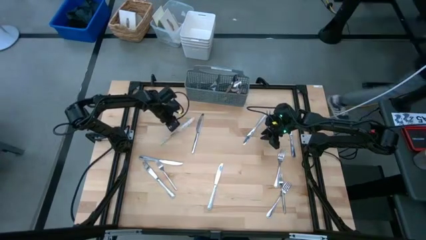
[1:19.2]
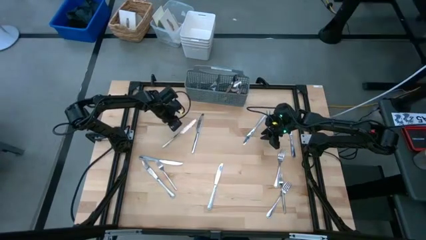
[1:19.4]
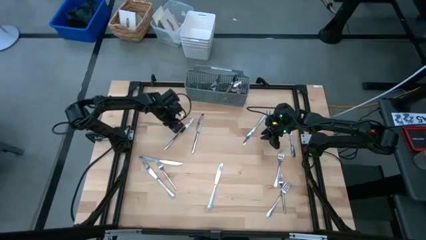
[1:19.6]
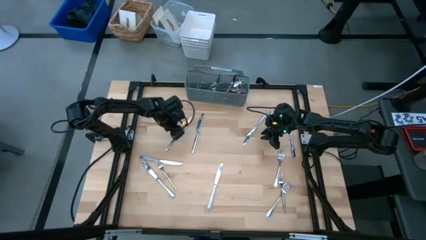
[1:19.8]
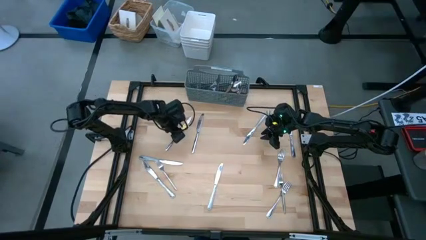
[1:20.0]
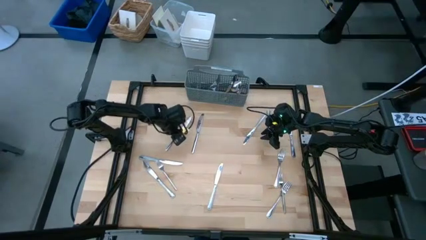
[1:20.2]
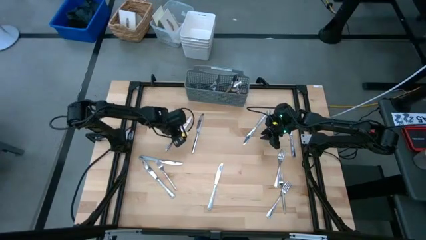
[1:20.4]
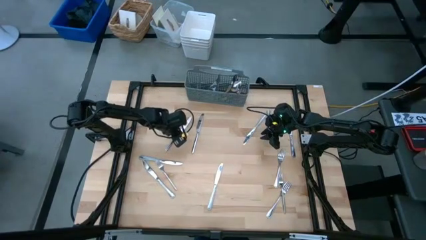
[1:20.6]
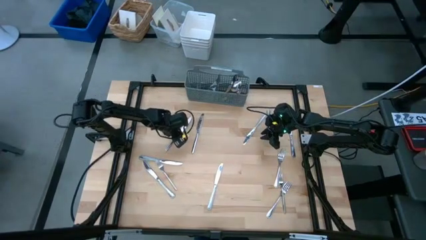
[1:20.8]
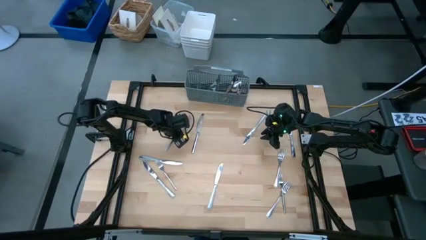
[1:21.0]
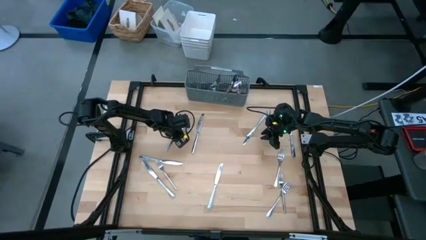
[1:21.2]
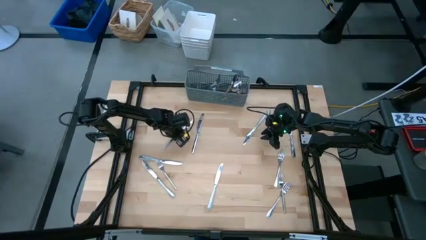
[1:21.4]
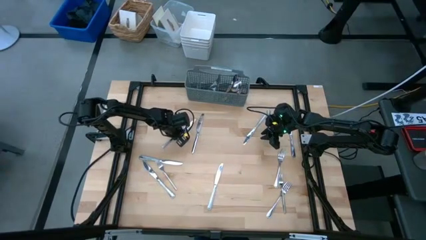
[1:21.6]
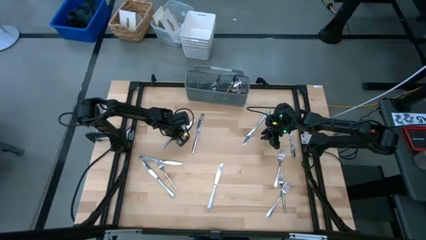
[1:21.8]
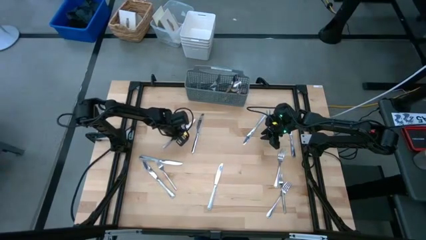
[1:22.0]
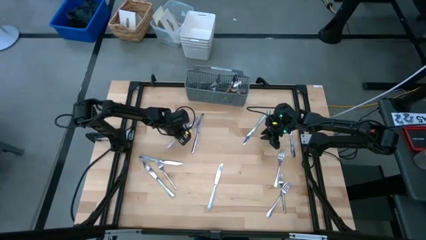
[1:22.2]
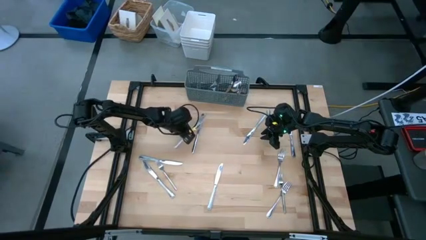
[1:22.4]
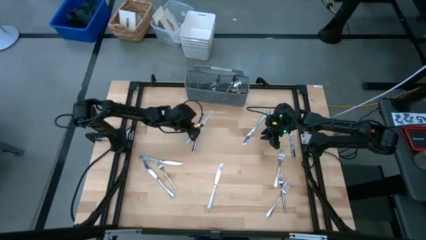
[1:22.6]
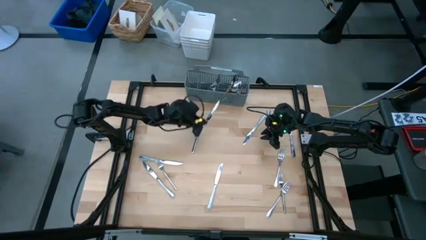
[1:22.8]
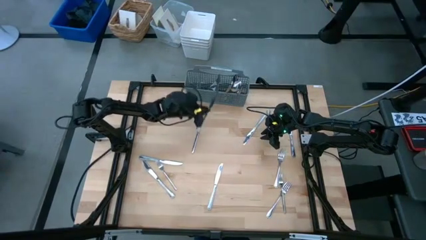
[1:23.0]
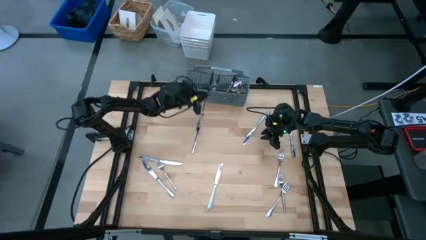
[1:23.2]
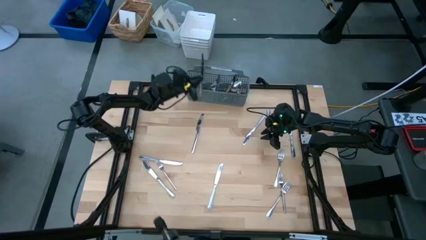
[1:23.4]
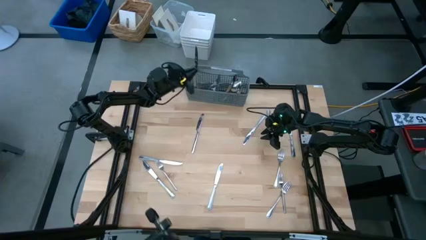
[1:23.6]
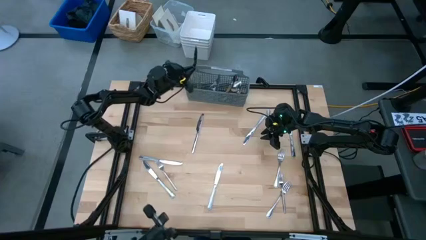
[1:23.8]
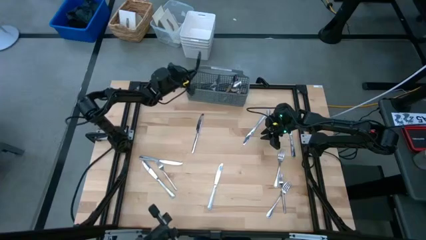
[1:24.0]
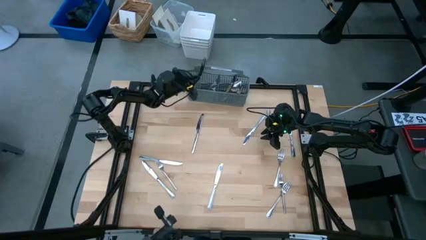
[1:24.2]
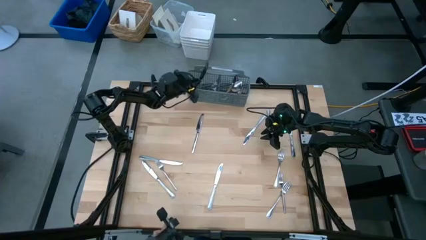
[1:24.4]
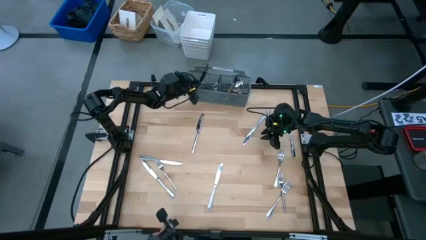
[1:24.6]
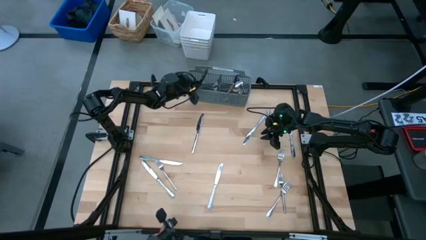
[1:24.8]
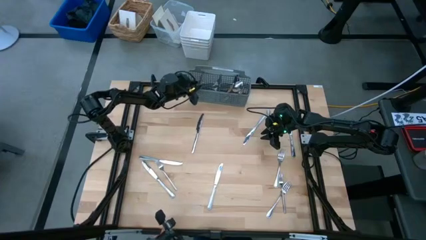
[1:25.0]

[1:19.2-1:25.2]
Task: Sort silverware
Put the table knife into the gray silverware organizer

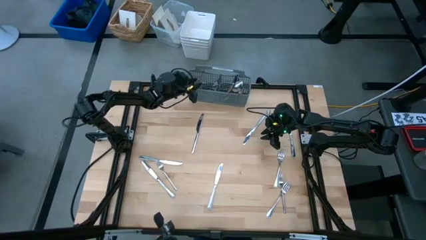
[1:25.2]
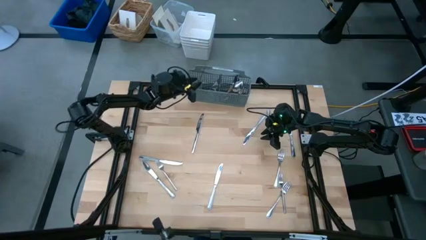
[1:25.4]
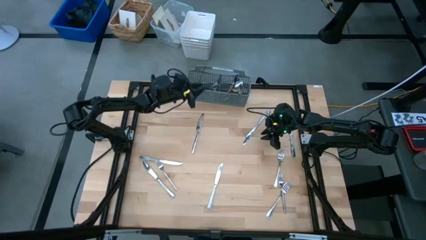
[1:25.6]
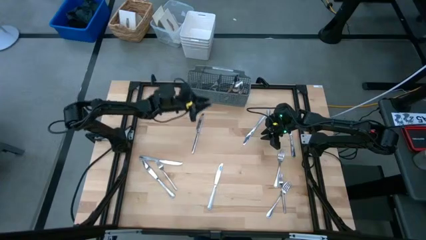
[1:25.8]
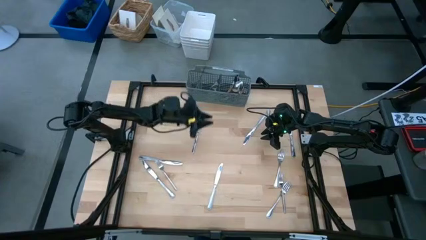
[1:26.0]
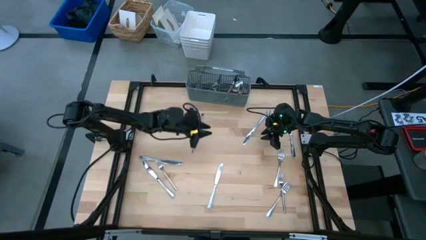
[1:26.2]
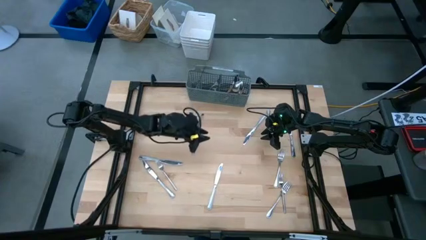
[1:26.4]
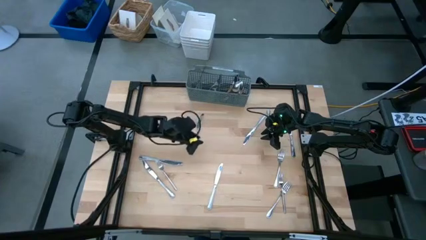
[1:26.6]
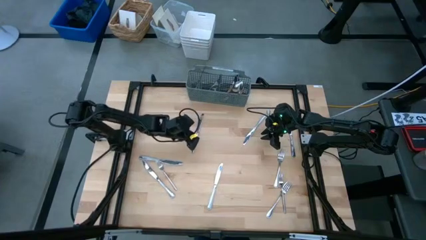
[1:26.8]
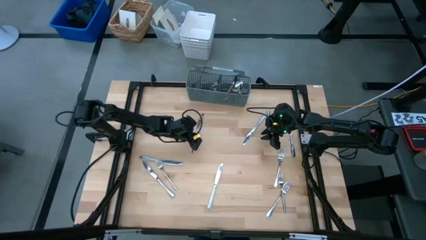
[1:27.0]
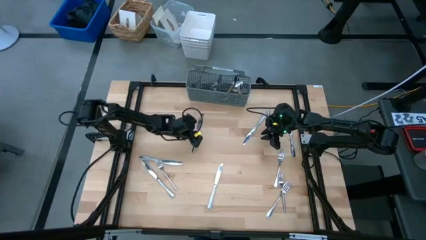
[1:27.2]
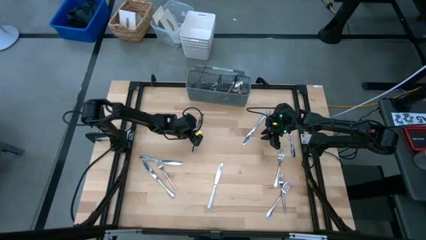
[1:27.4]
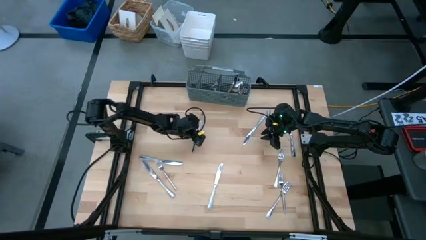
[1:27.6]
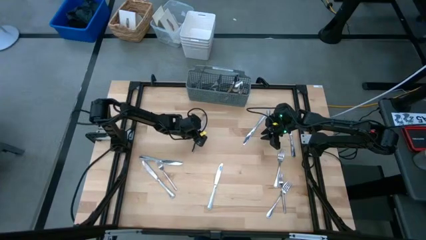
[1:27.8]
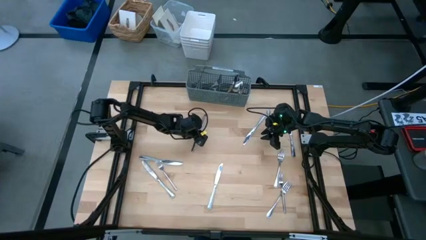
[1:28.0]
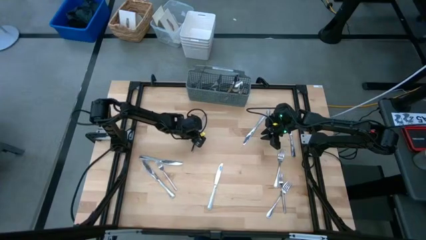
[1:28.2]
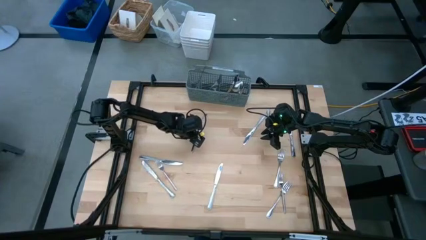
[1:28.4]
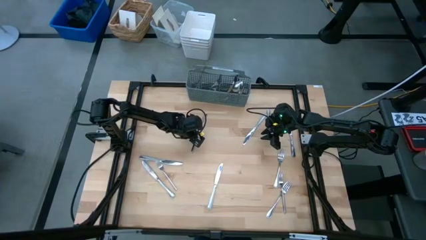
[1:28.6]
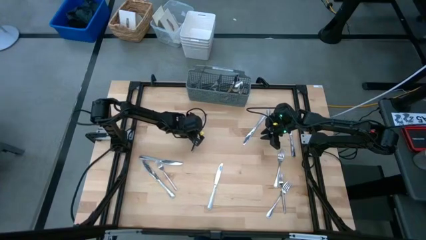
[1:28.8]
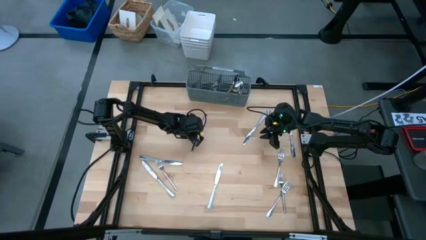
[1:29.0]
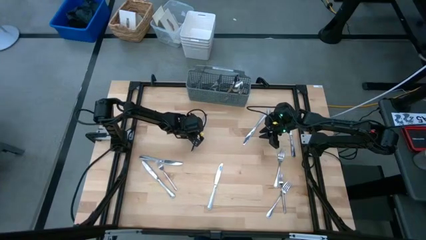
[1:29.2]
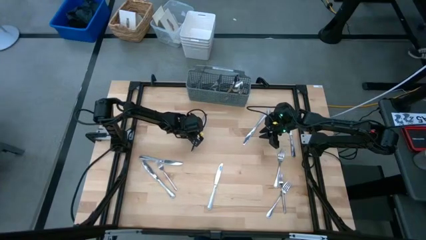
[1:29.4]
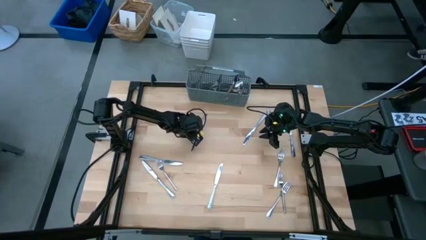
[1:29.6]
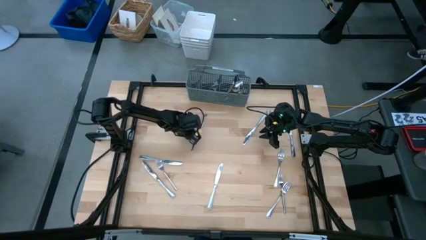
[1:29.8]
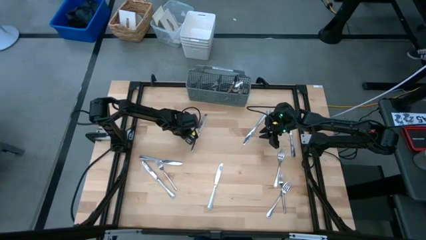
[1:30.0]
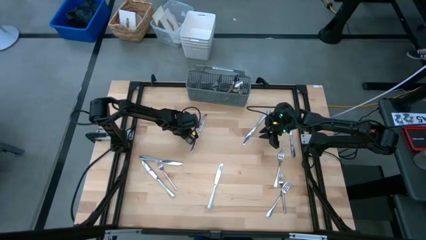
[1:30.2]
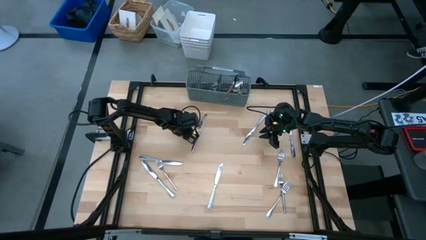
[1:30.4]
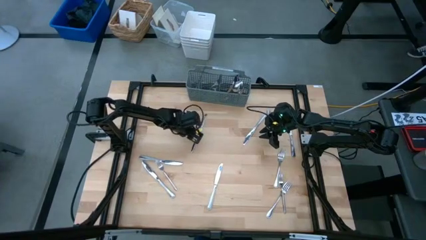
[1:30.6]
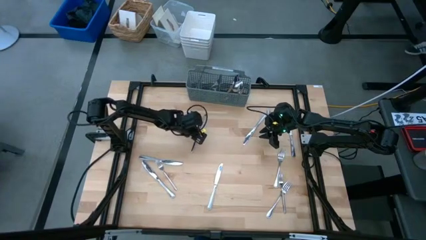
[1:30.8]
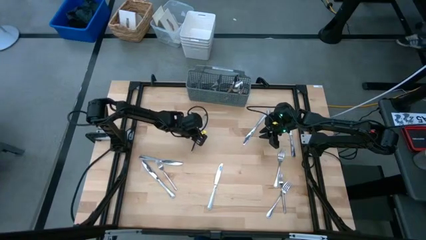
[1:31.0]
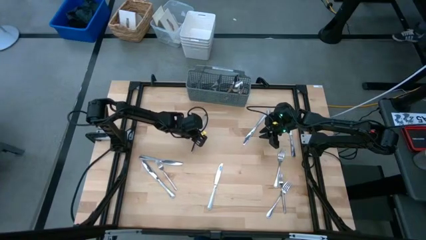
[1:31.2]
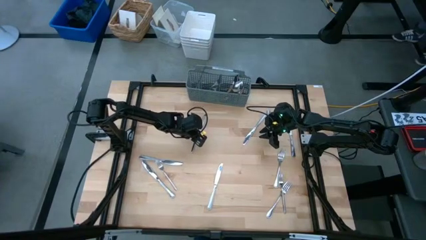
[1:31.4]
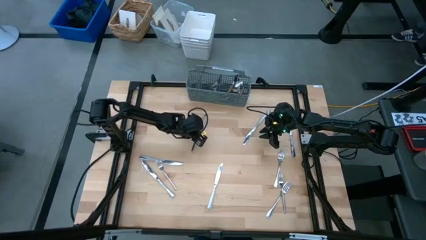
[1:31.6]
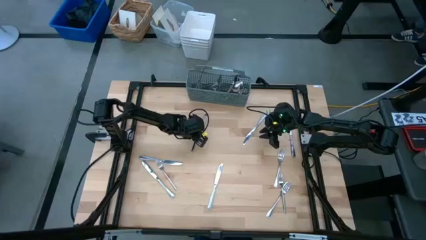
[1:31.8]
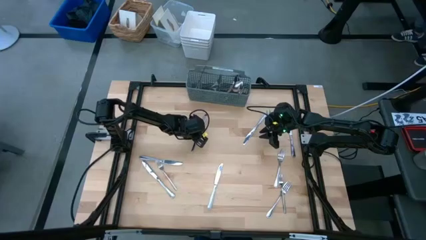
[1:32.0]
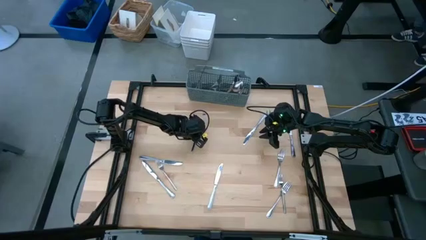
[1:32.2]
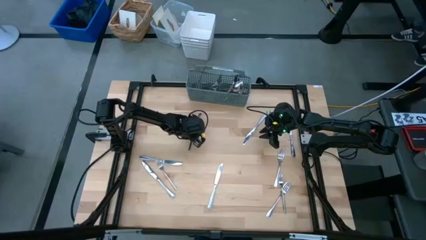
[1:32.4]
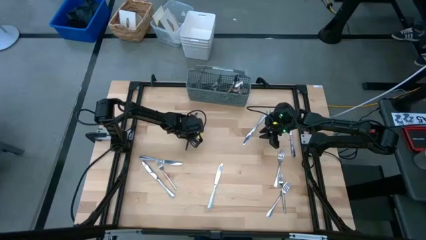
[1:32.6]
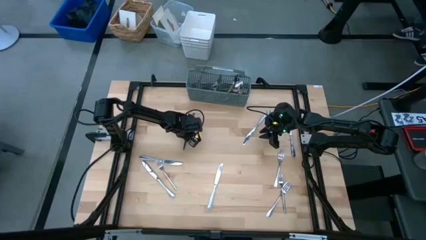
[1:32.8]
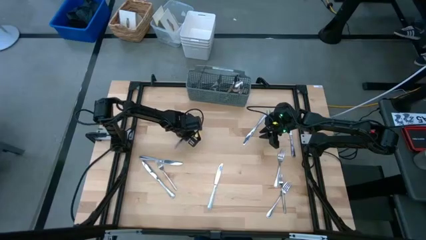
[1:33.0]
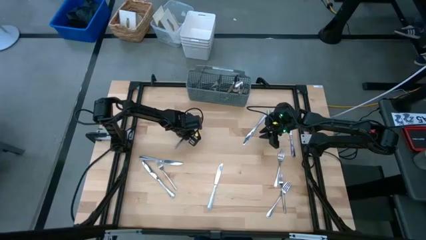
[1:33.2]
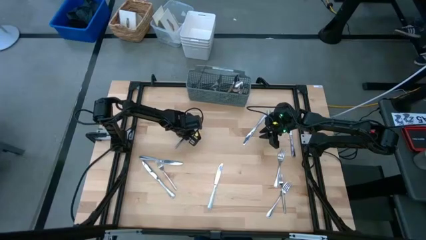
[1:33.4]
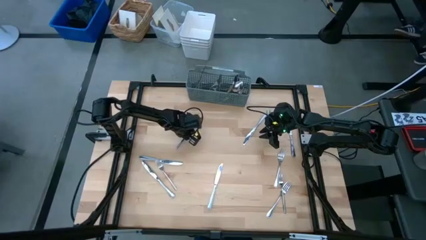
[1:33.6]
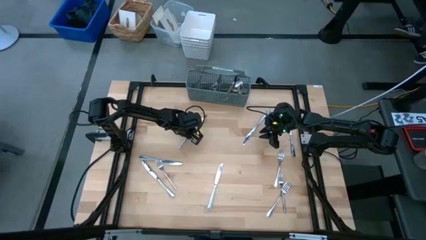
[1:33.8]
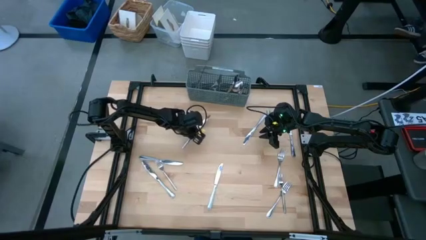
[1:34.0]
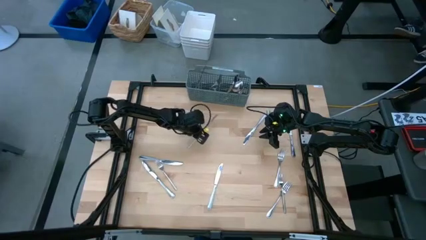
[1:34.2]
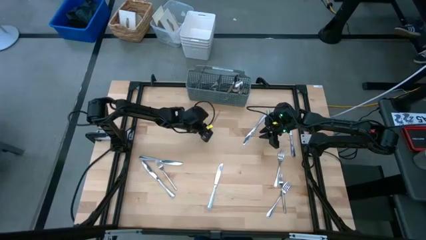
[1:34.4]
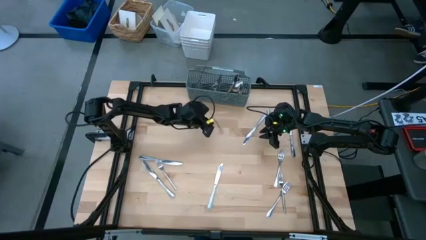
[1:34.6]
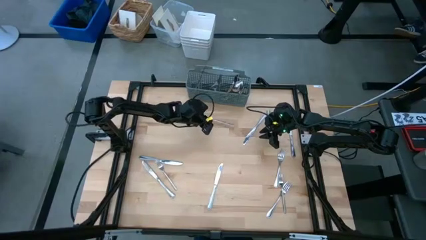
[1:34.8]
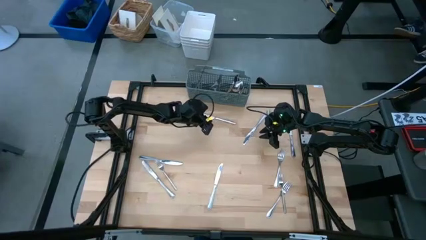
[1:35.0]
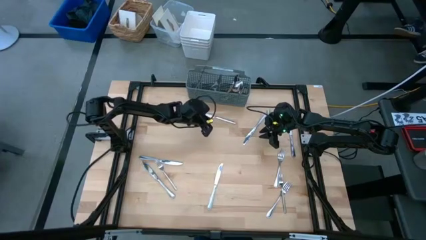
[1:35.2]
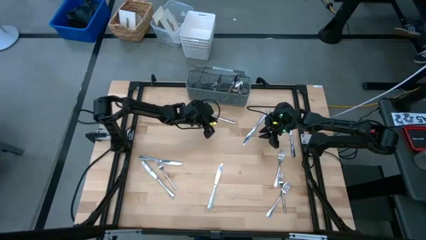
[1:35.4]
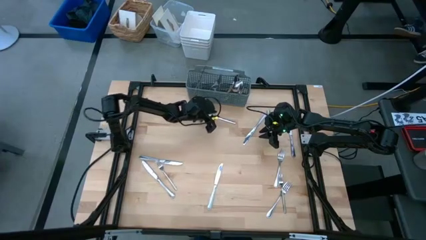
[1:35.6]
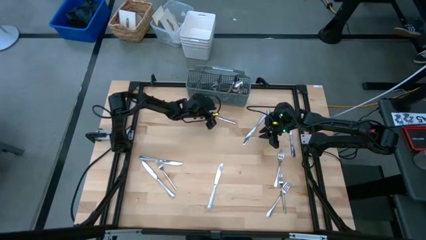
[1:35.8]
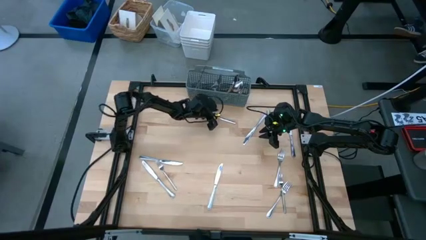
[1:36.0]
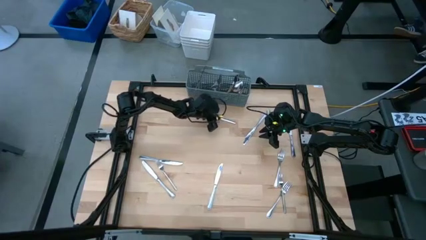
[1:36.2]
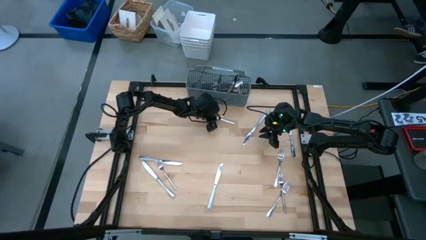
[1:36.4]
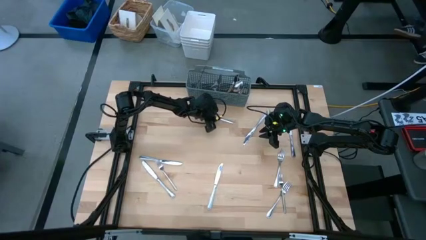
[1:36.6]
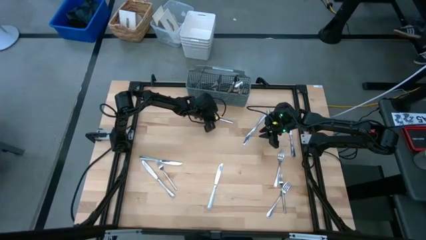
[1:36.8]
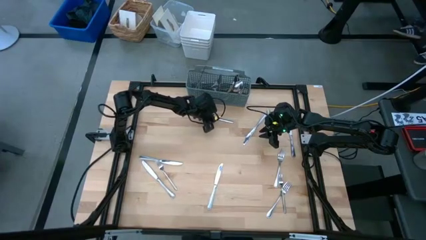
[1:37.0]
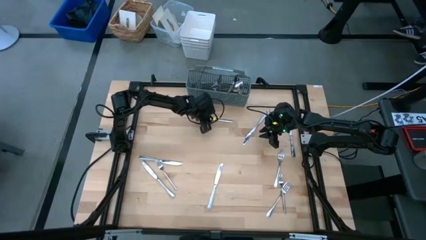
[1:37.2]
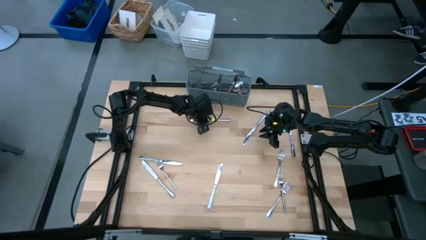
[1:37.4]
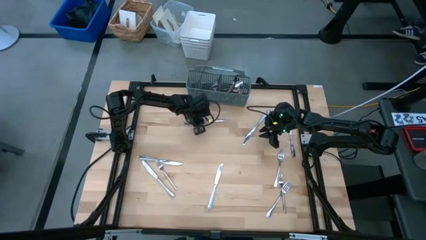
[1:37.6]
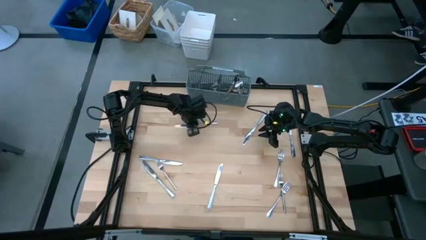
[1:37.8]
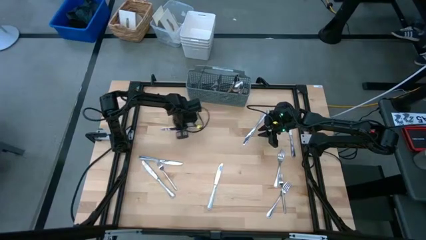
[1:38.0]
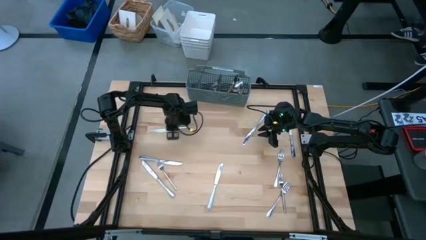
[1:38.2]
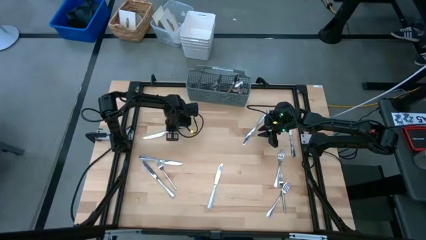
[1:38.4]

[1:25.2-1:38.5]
Put the table knife into the gray silverware organizer
